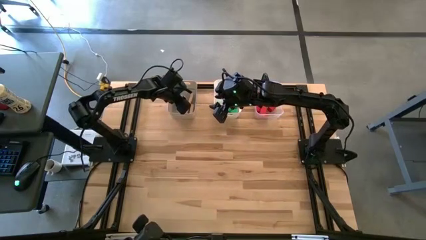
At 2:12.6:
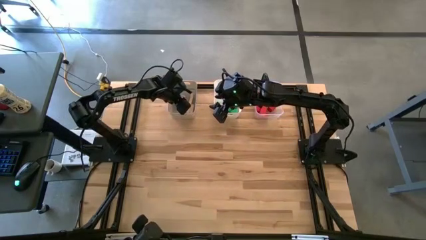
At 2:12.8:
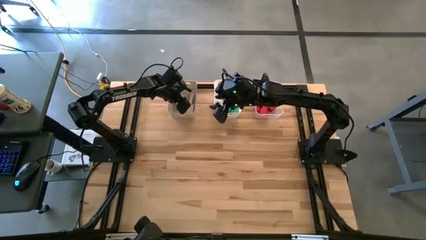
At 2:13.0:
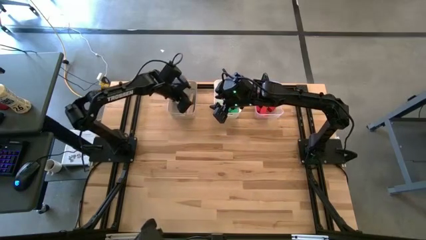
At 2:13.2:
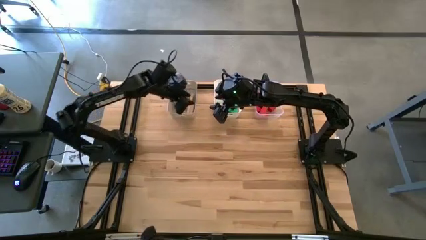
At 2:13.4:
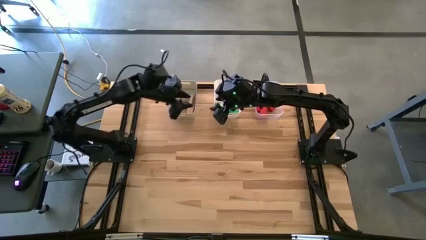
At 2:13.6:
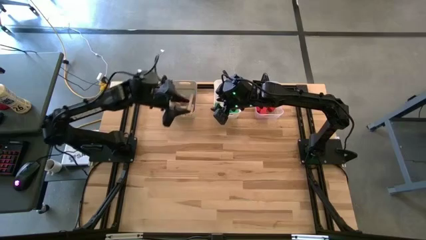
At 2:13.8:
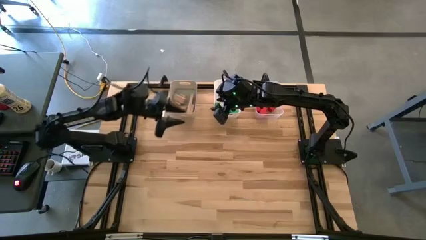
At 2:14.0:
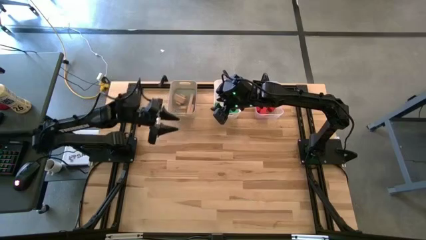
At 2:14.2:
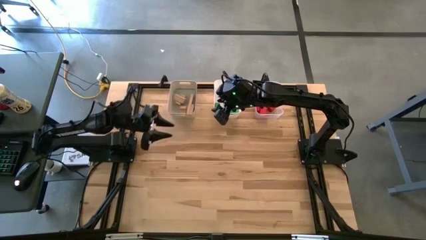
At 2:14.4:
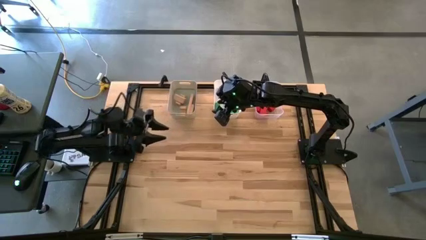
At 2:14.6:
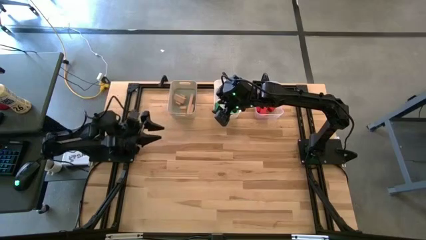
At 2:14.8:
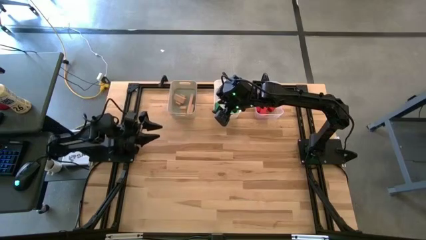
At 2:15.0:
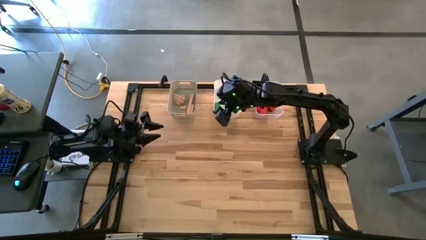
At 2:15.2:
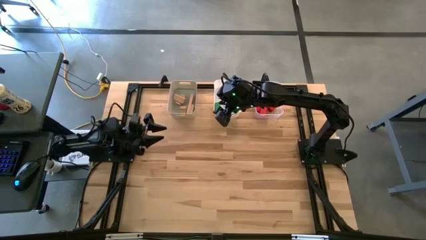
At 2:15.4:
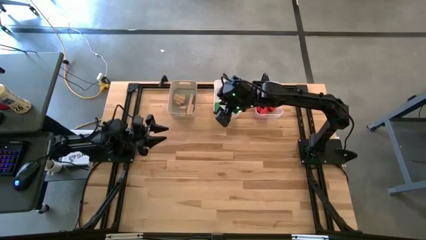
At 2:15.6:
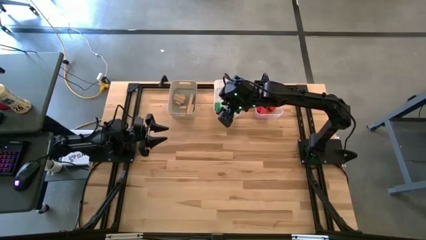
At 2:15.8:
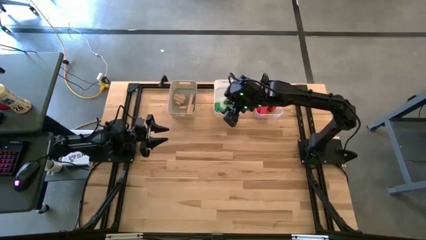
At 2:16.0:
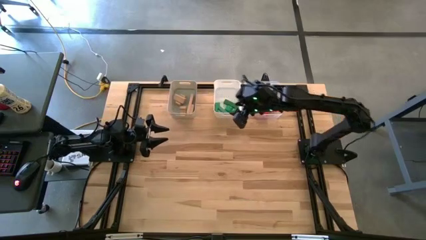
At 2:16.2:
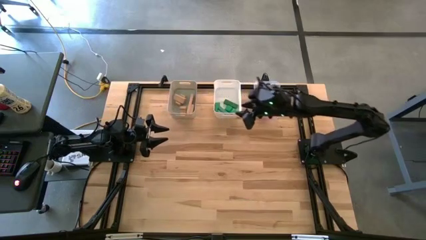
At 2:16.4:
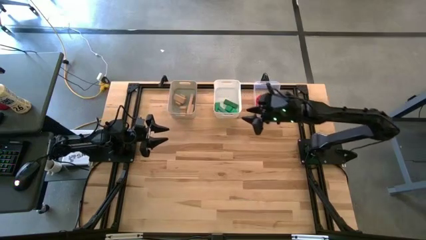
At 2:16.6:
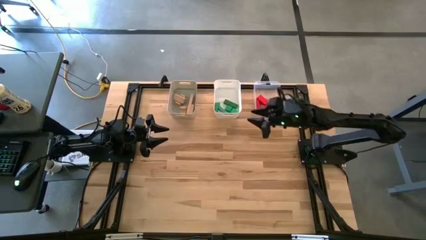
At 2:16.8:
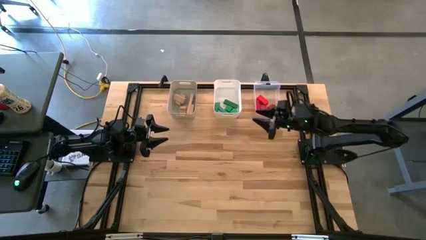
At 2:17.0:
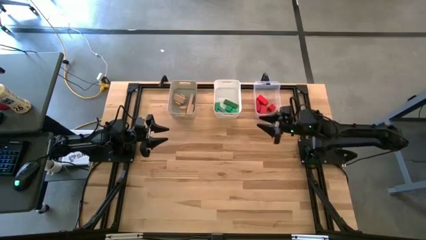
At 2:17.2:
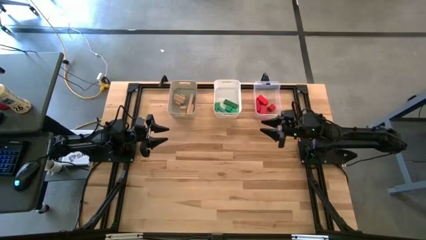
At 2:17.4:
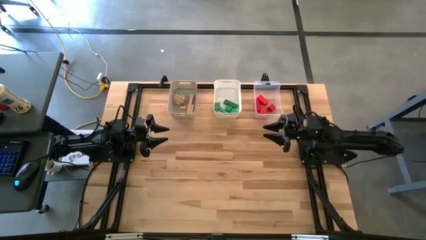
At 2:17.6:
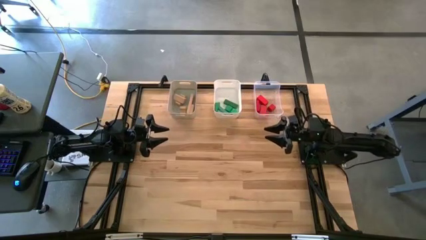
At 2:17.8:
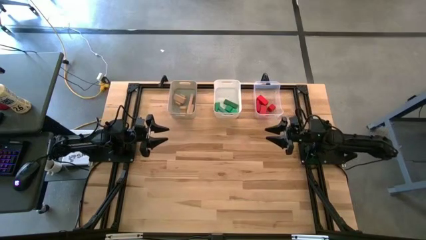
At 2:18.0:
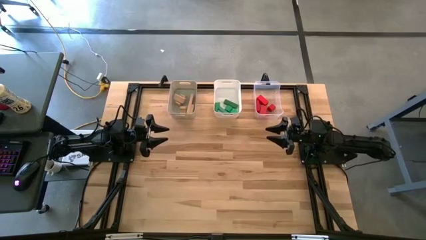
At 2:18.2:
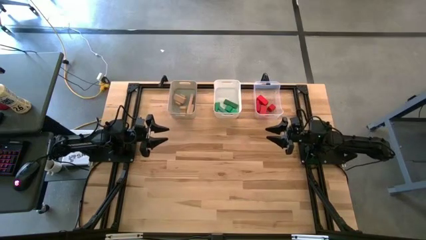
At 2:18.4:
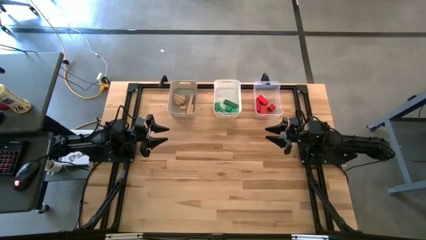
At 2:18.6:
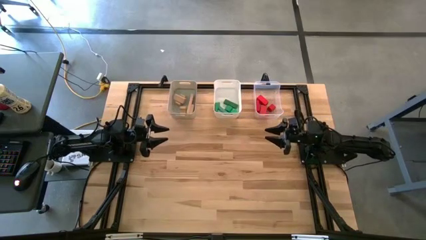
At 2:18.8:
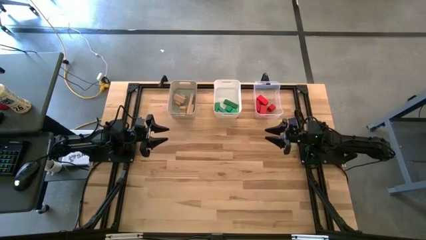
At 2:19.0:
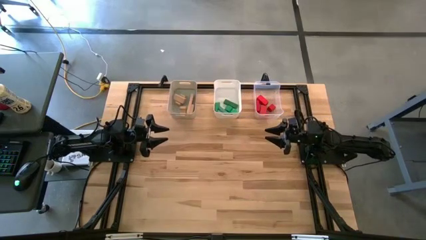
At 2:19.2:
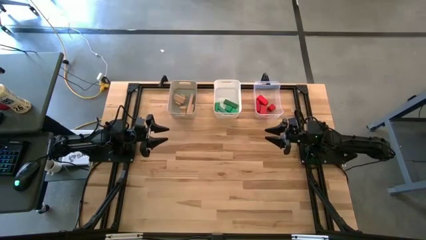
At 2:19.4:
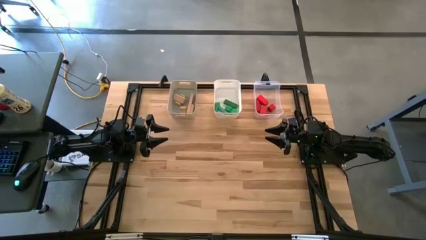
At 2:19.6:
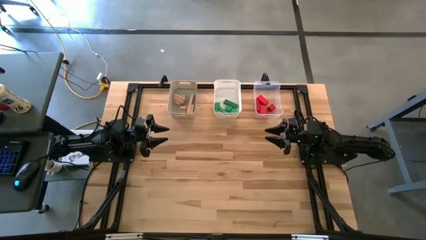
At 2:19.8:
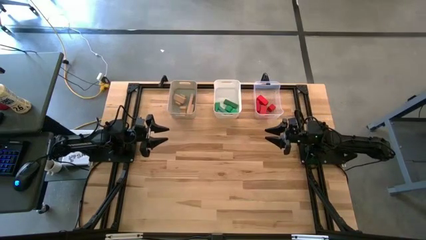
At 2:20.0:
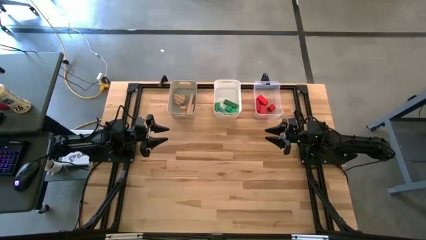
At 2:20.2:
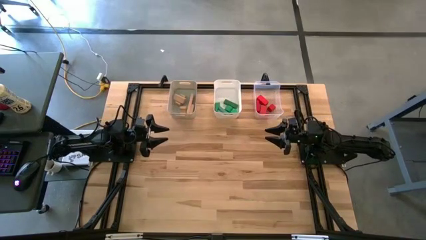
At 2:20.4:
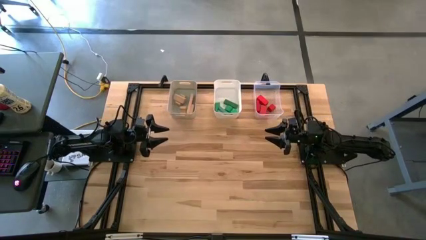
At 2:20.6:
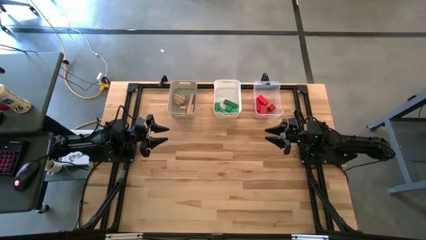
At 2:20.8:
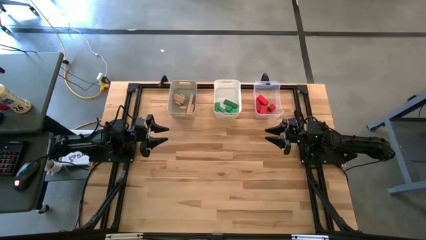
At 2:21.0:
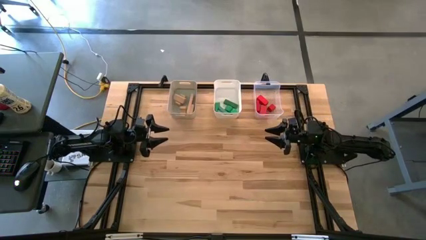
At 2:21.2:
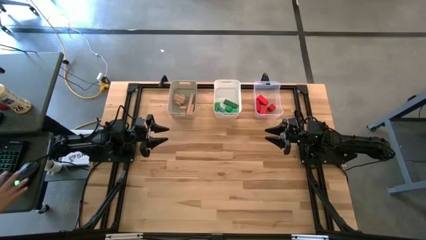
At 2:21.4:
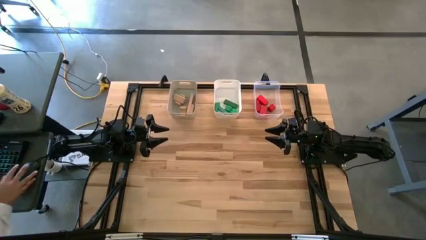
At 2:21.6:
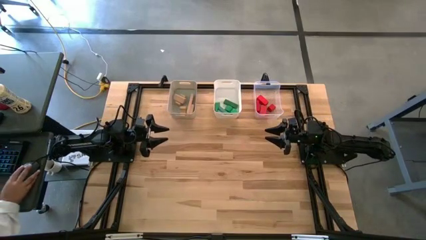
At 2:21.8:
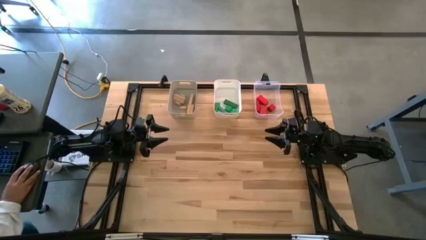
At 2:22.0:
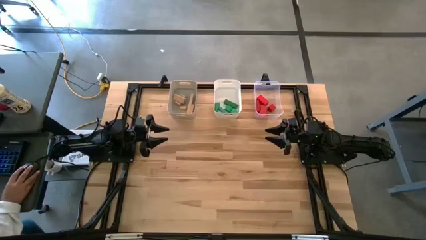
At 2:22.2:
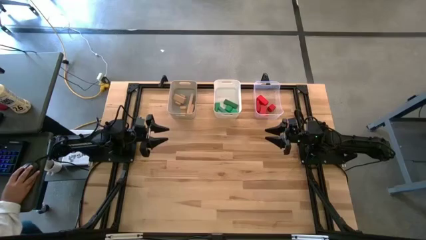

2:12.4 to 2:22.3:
Task: Sort & place blocks by color
Return to Home Position

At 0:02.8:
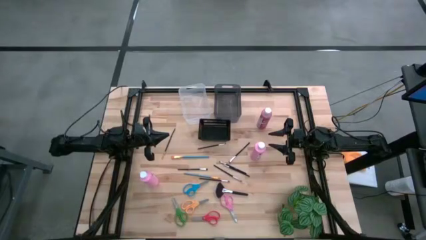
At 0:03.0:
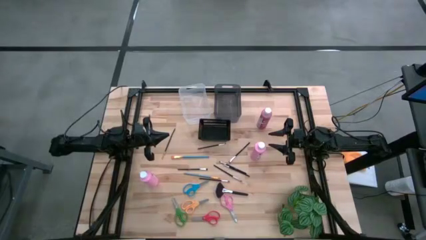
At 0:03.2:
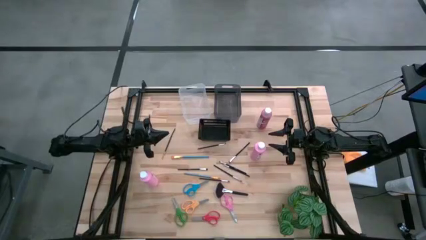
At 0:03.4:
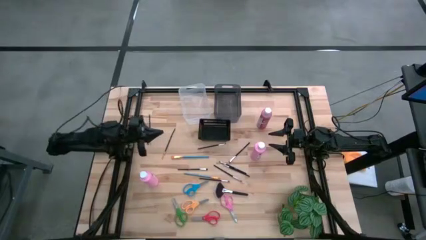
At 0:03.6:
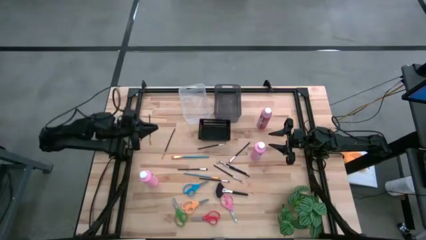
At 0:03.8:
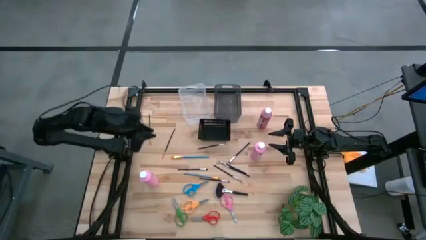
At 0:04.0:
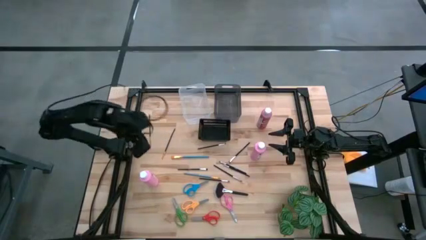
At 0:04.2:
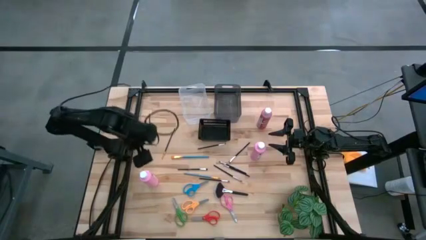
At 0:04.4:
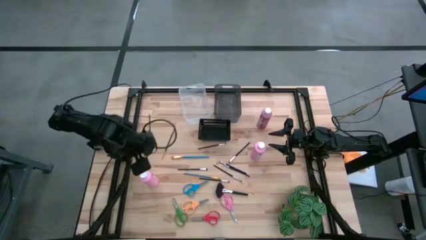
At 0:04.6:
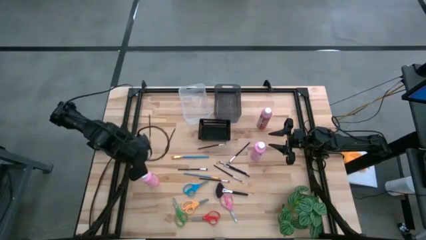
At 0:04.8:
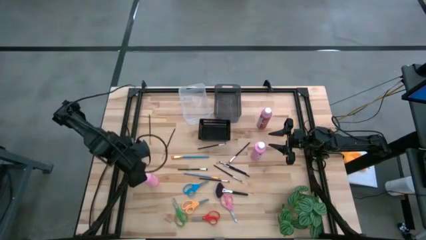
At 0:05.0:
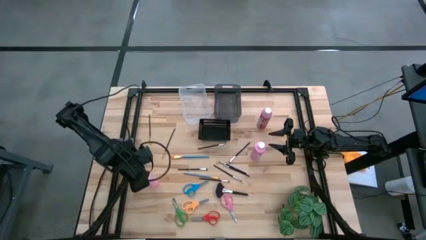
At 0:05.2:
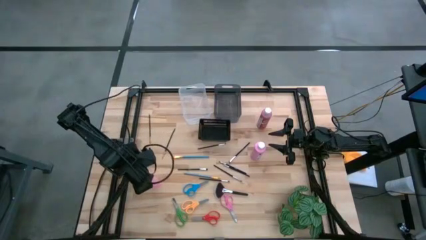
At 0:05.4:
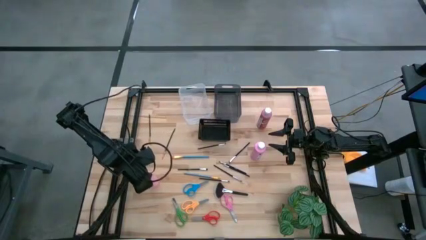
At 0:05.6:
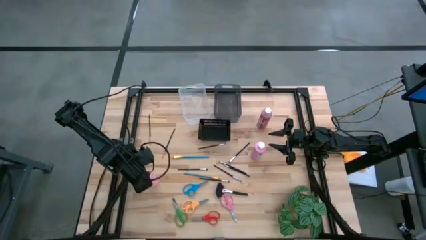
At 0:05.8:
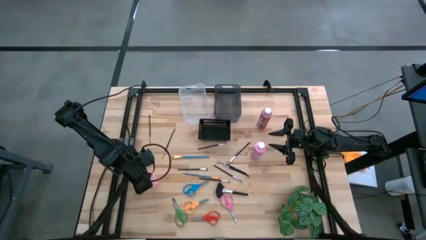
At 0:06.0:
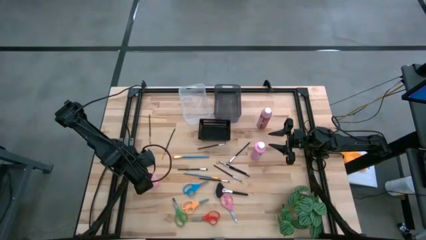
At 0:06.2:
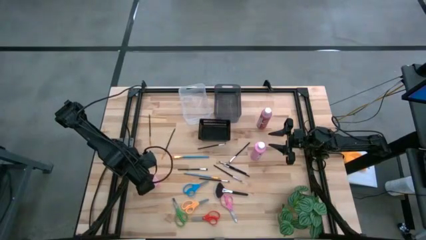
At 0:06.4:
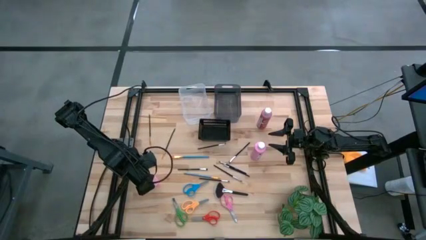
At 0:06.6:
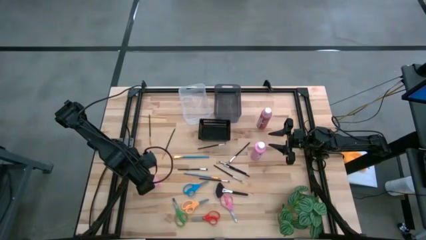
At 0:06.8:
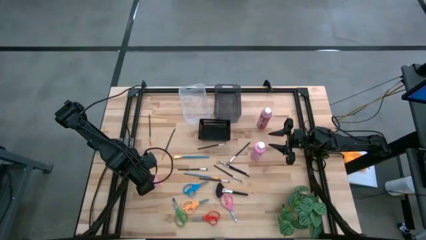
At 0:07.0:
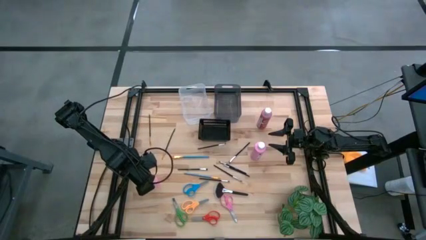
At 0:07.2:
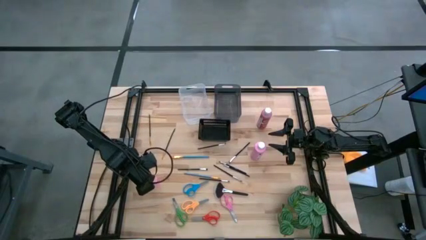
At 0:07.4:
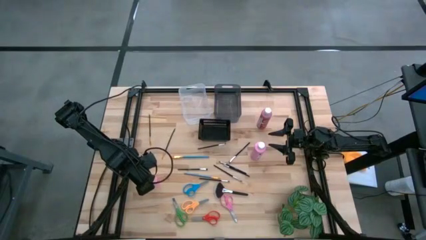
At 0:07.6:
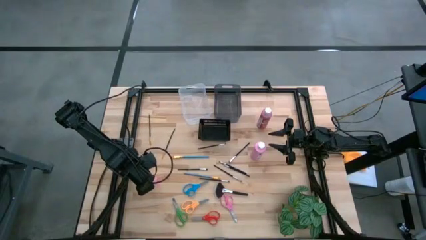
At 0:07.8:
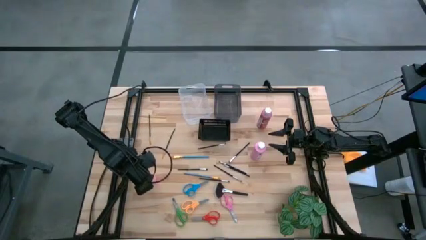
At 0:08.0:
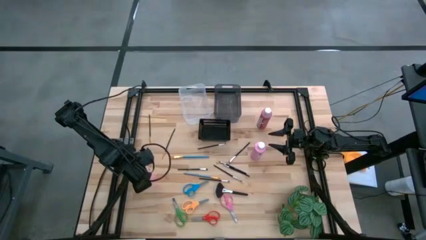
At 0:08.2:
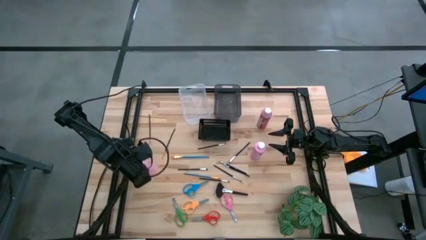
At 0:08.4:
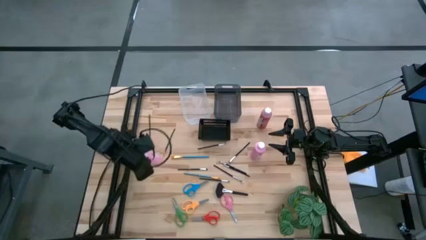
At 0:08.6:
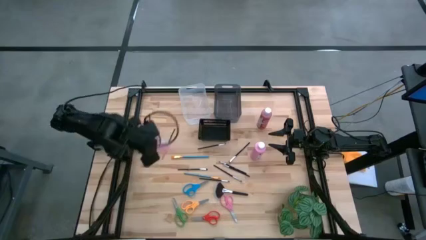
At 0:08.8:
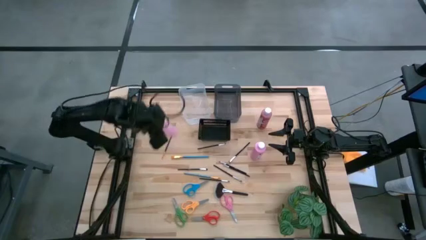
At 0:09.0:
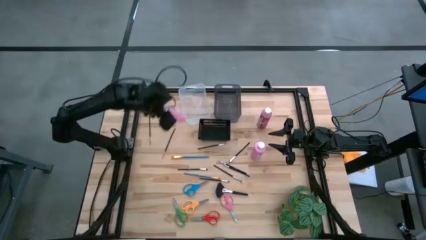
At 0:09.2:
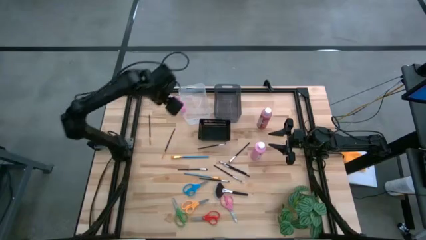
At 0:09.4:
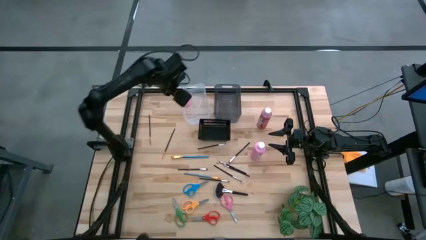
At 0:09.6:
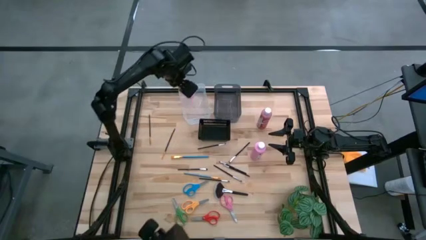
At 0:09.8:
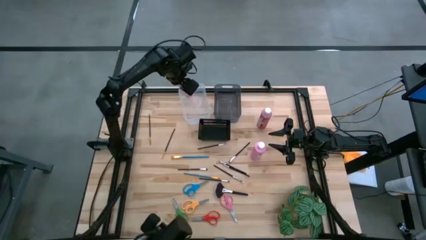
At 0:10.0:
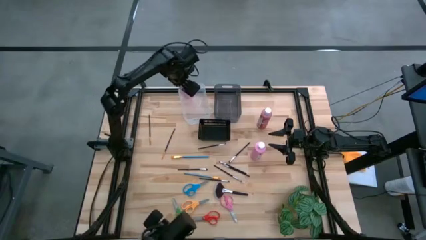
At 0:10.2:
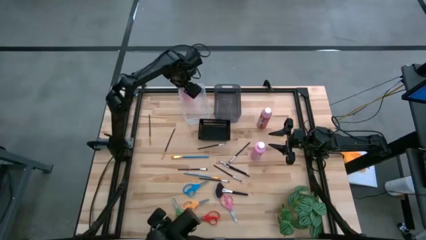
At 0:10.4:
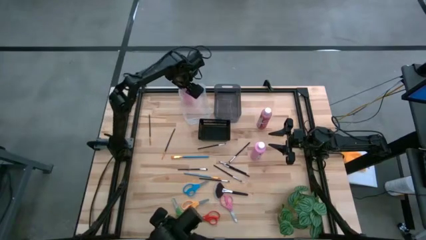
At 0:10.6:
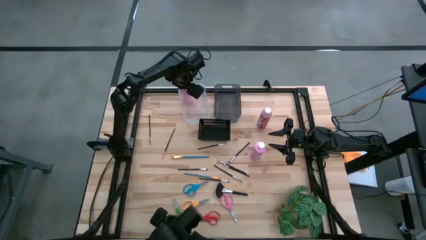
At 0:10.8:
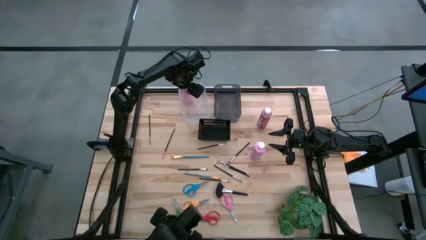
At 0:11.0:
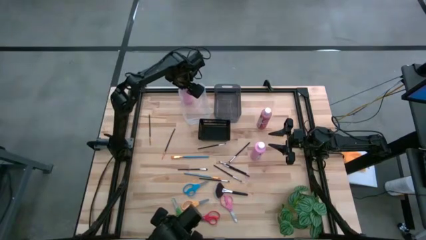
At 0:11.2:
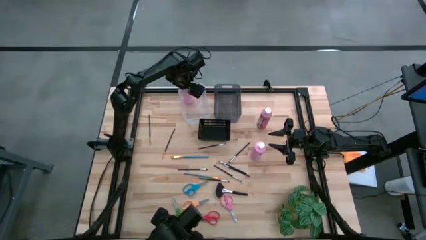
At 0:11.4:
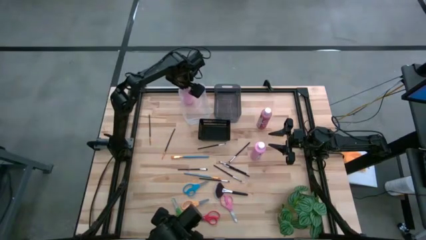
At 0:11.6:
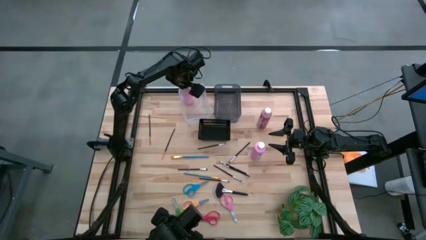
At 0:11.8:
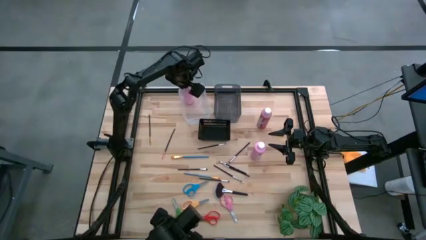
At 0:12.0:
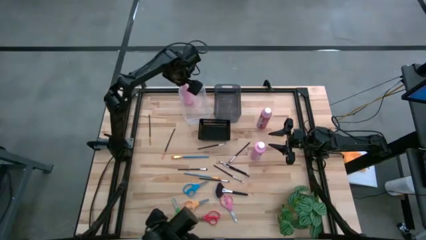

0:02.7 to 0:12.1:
Task: Pick & Place Paint Supplies
Put the pink paint bottle into the transparent bin
